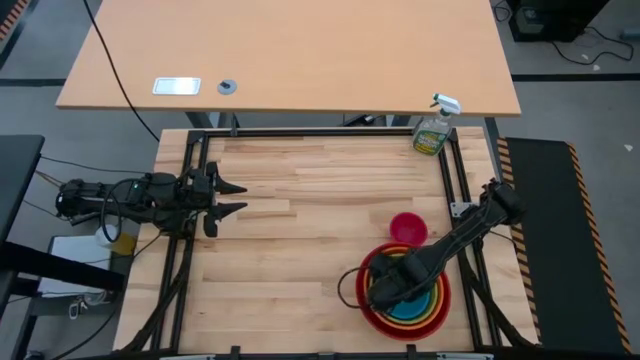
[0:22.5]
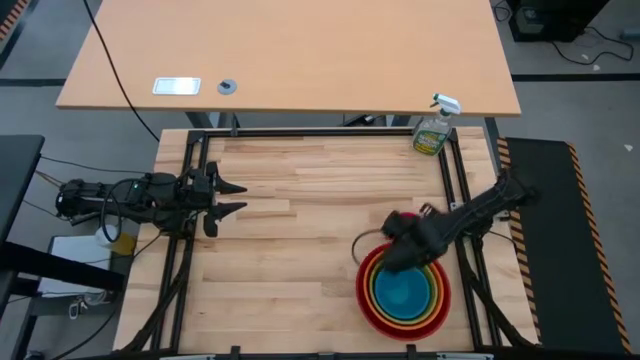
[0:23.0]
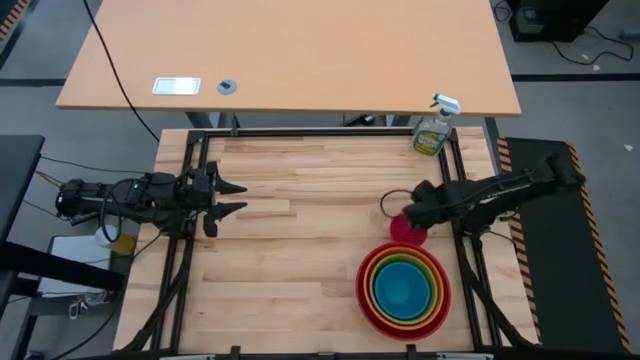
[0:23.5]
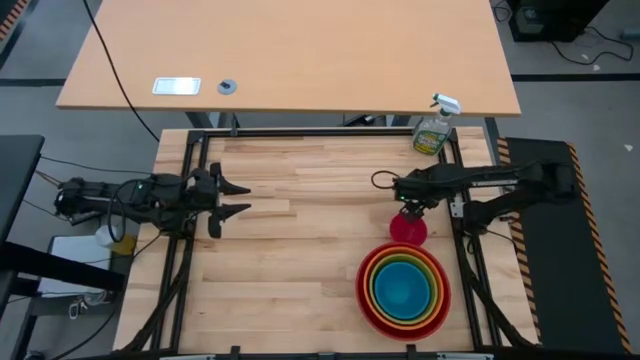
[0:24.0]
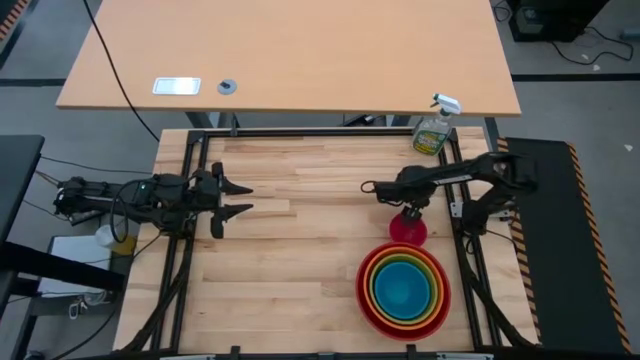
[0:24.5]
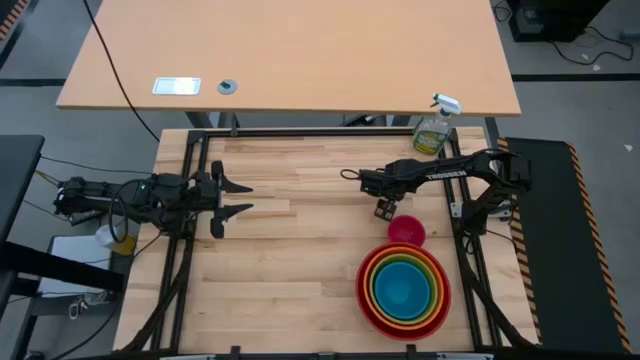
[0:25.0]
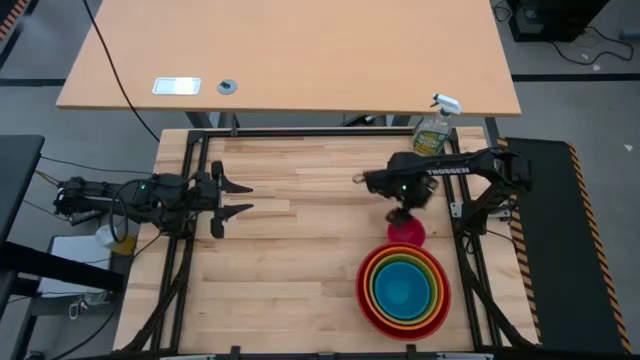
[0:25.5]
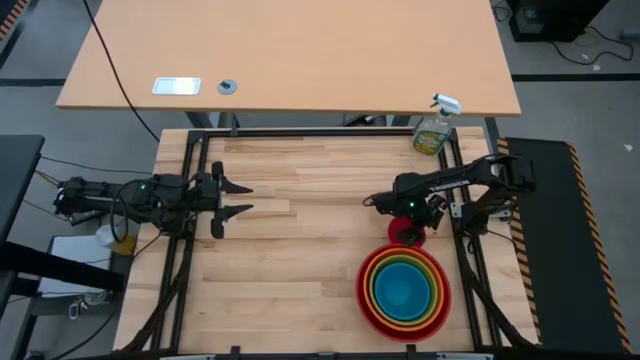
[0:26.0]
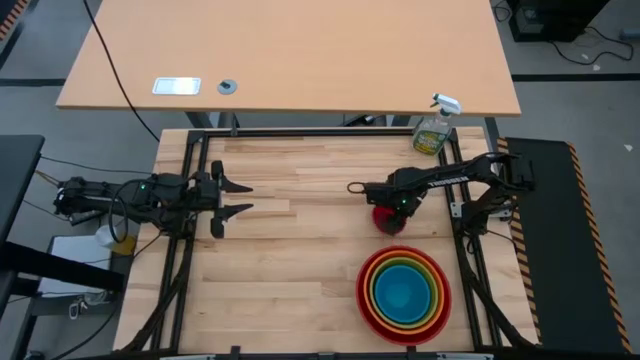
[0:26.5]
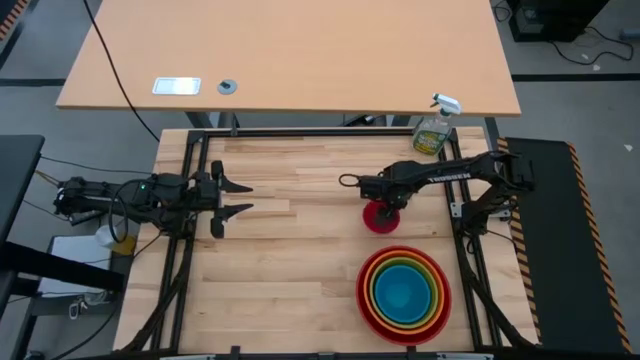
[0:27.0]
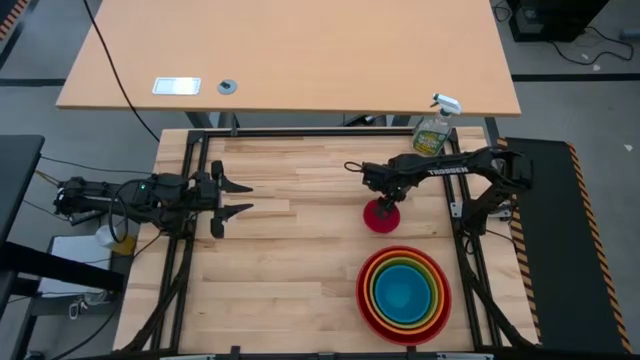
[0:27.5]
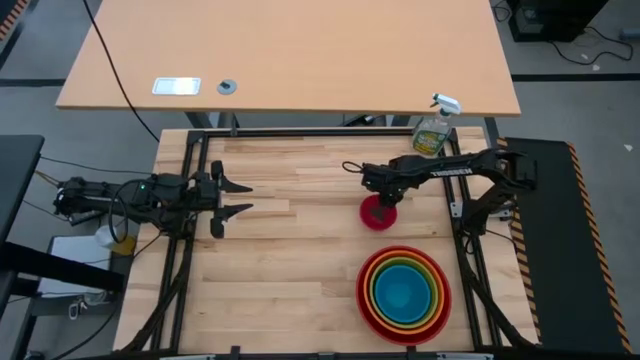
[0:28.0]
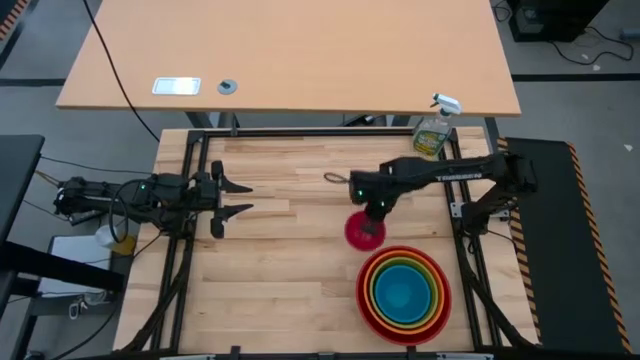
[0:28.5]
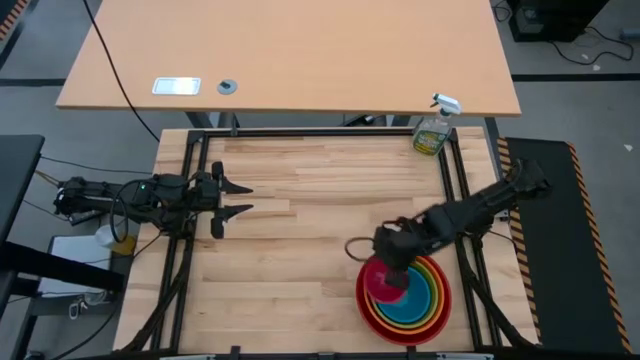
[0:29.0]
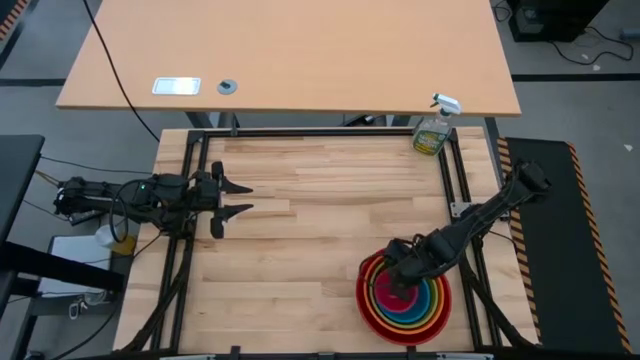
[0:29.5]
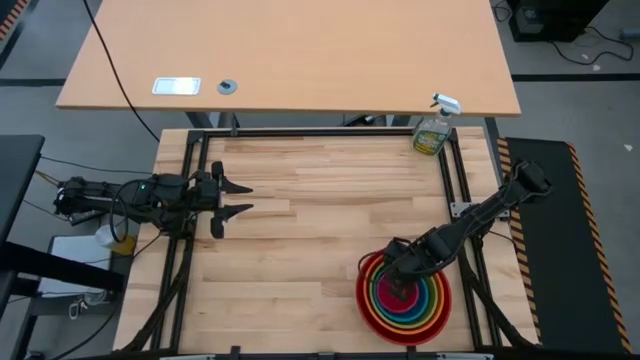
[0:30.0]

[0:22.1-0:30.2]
Stack the pink bowl on the blue bowl

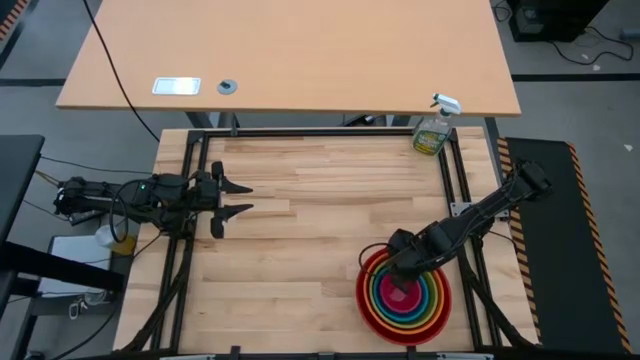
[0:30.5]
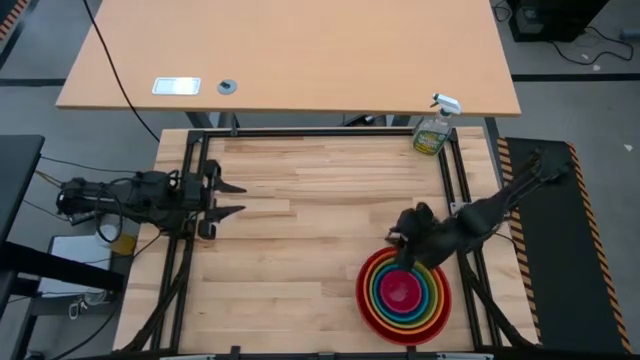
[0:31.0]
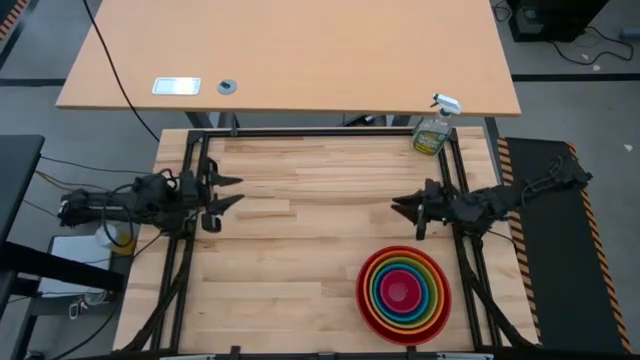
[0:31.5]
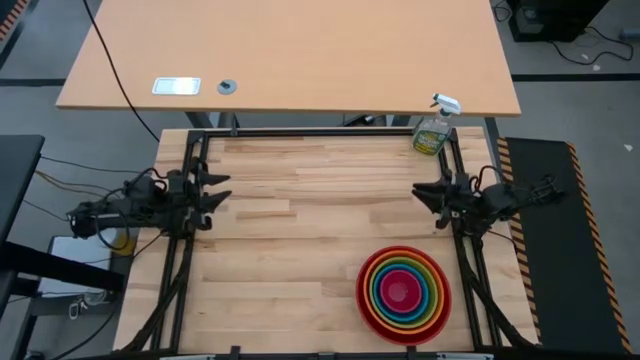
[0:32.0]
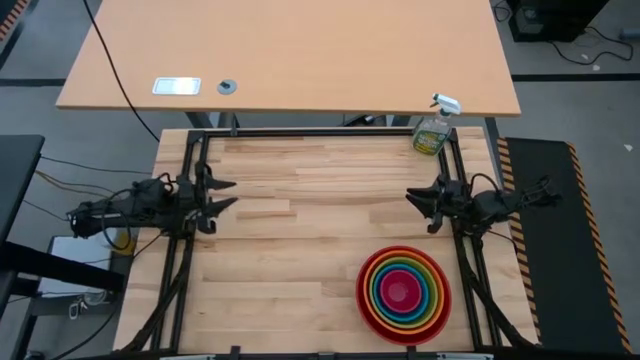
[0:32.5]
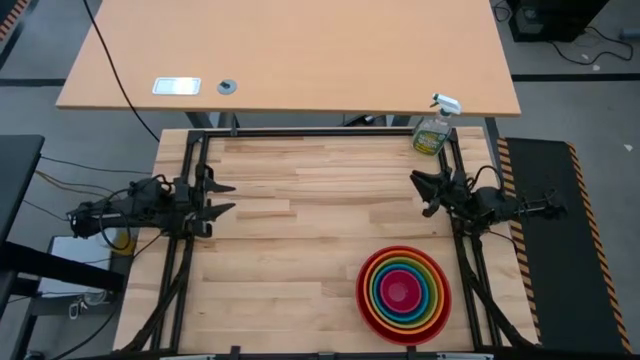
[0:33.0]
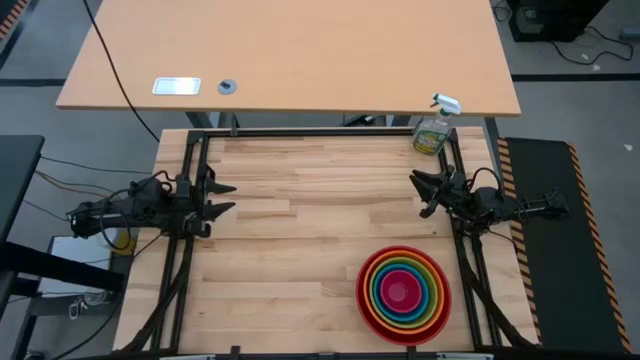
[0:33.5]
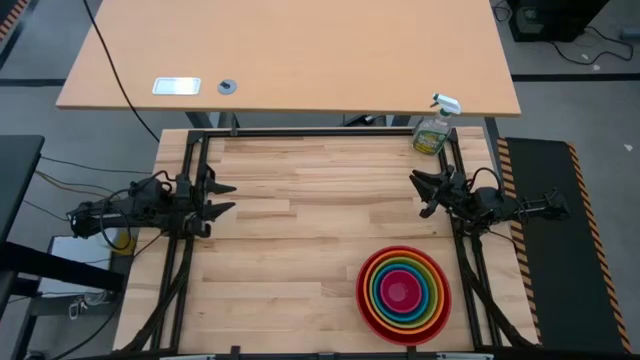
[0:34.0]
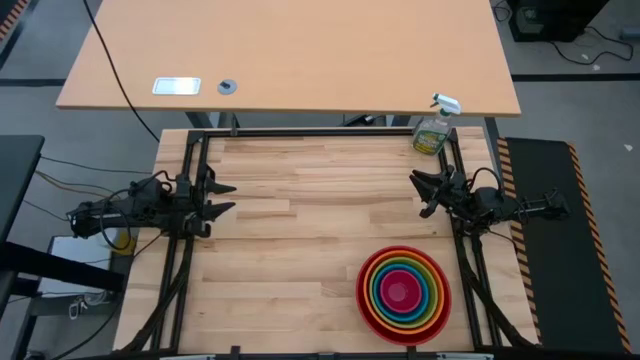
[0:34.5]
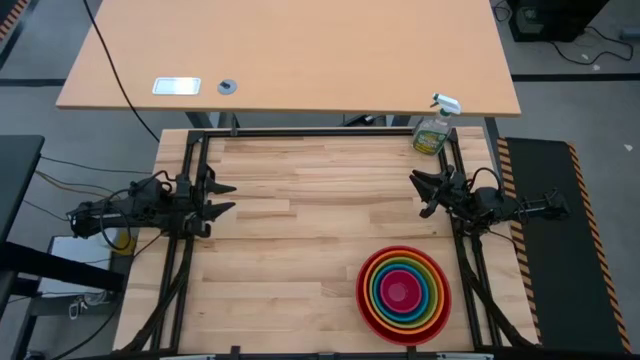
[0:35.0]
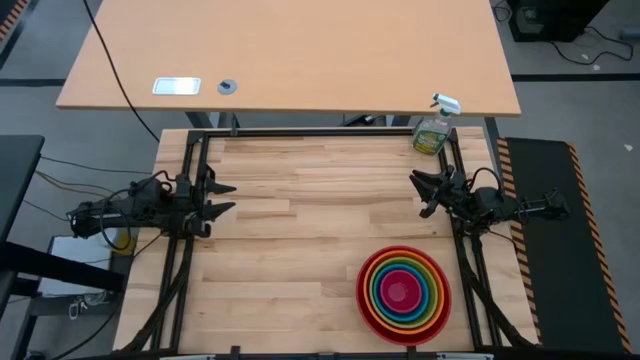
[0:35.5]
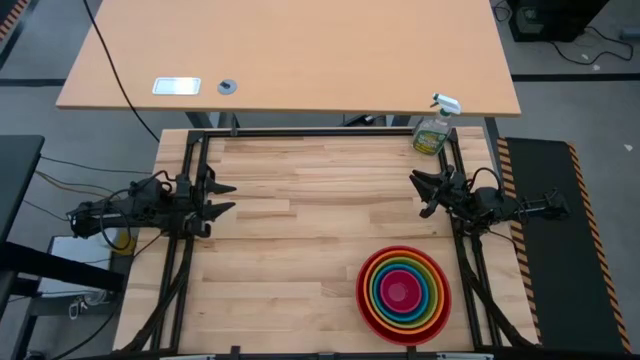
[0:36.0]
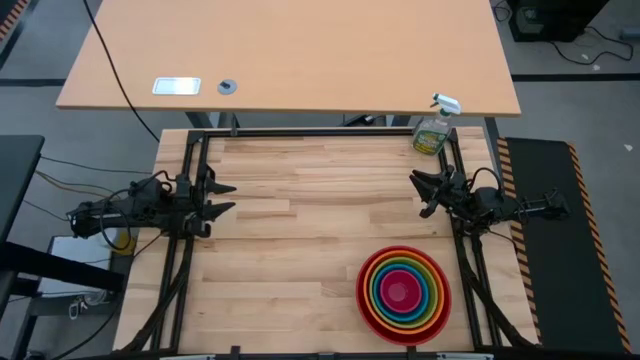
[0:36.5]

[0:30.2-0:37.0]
Return to Home Position

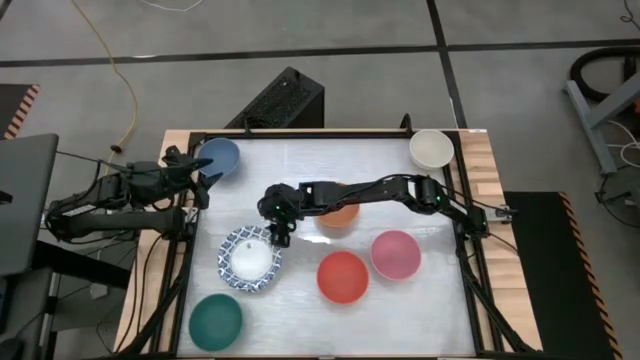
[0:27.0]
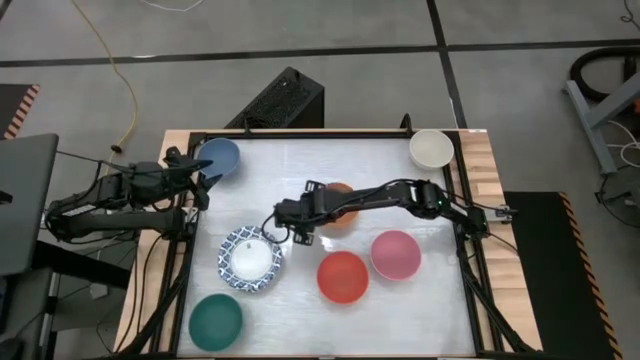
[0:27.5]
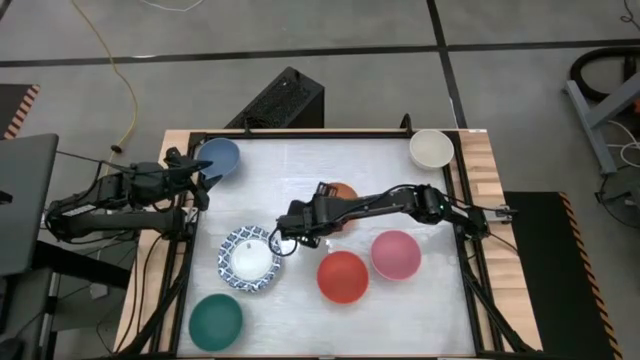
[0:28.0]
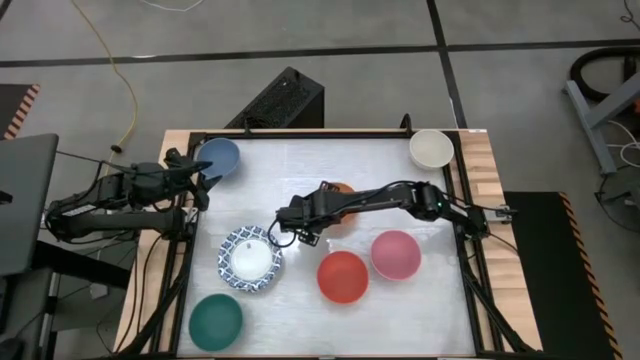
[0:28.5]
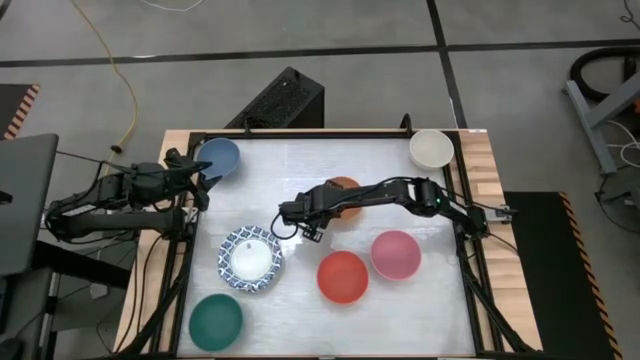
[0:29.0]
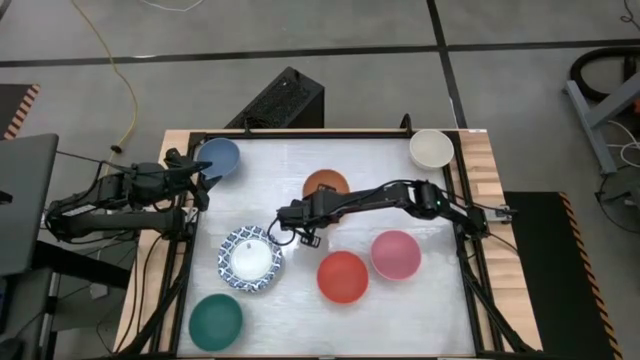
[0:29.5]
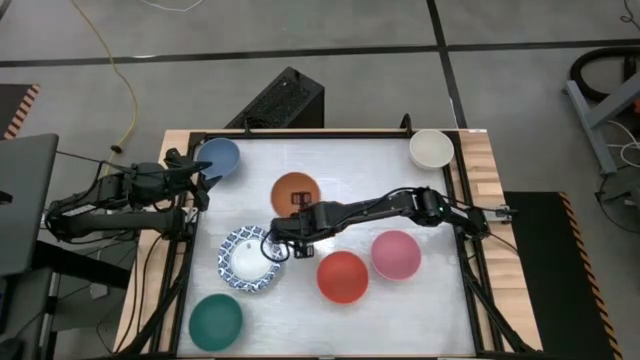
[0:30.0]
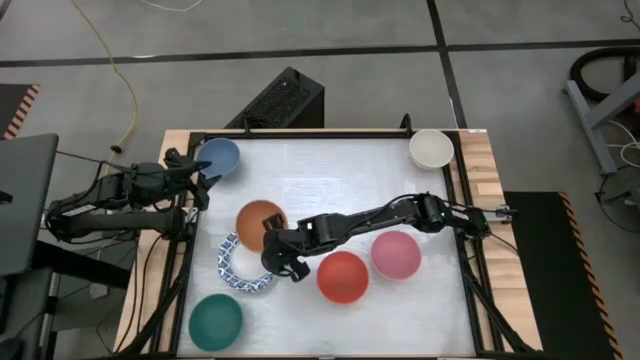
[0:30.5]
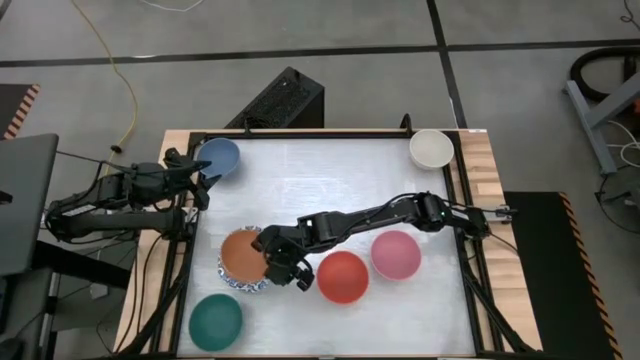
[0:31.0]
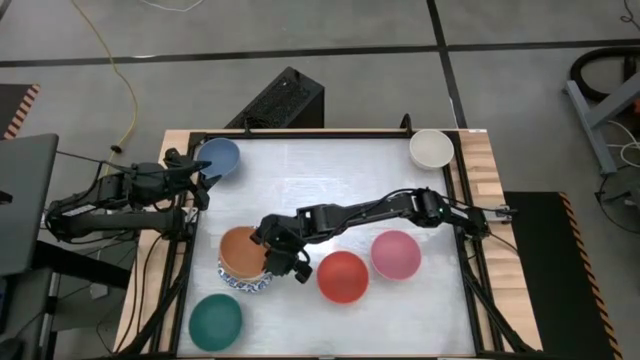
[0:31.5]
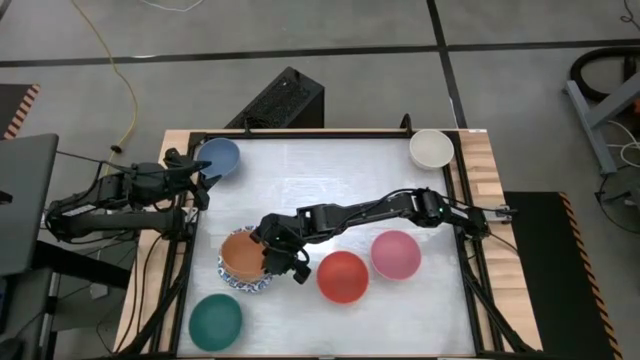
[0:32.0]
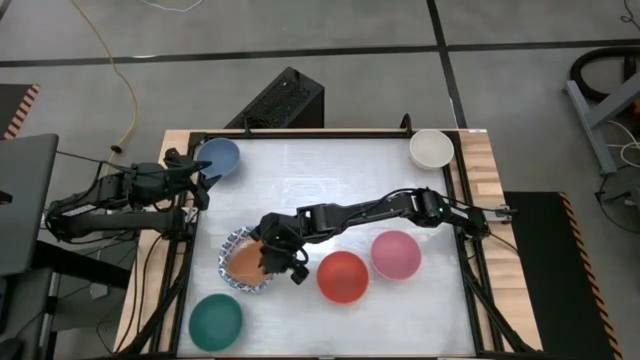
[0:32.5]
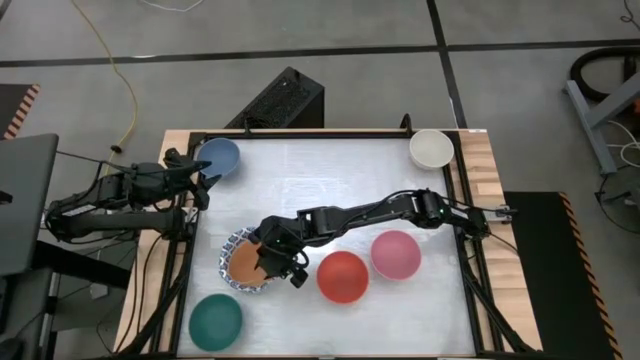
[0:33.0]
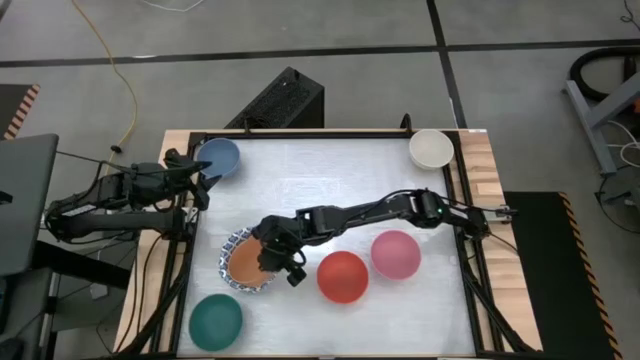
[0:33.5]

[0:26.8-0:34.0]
Stack the light orange bowl on top of the white patterned bowl
